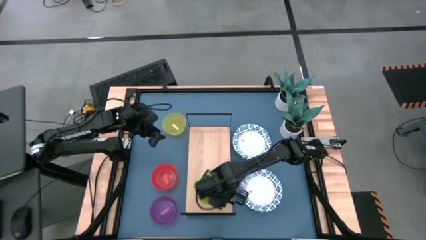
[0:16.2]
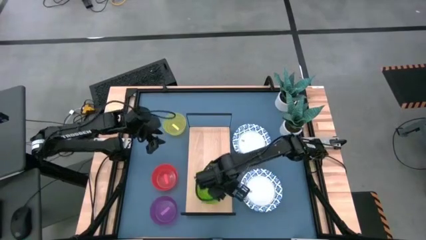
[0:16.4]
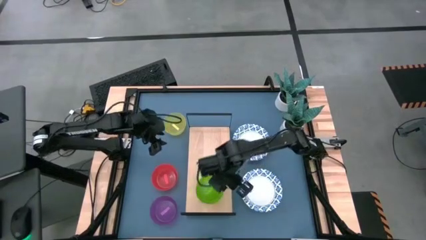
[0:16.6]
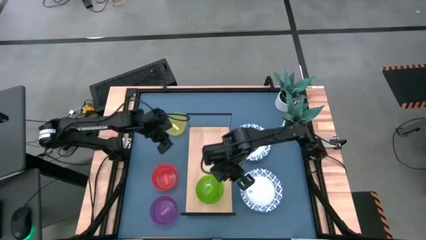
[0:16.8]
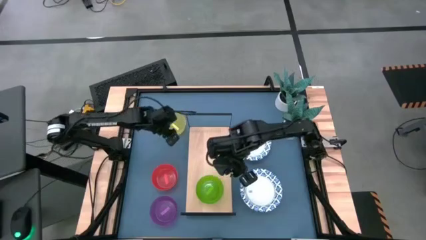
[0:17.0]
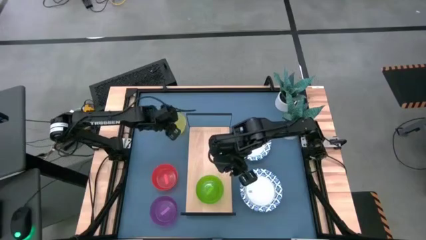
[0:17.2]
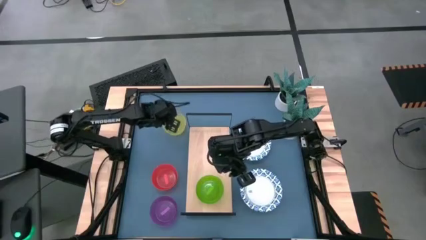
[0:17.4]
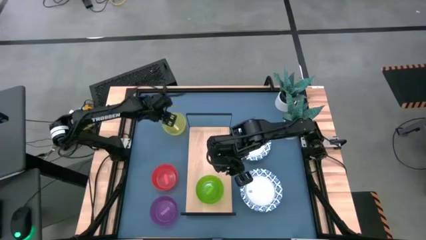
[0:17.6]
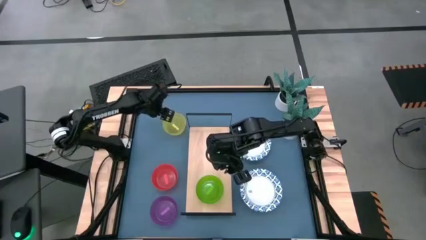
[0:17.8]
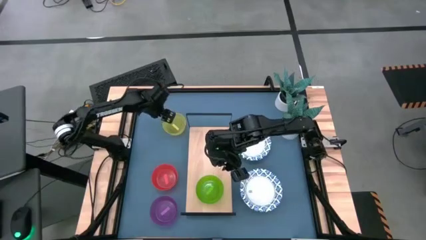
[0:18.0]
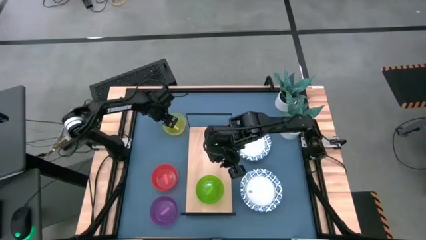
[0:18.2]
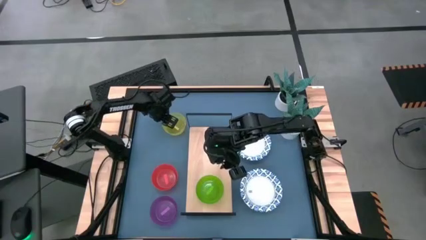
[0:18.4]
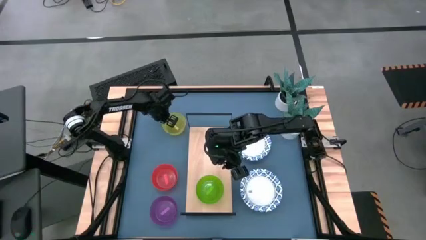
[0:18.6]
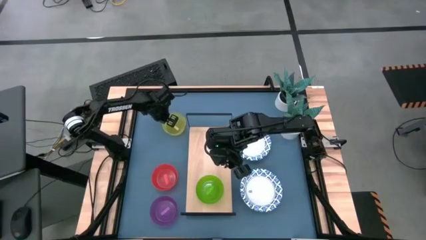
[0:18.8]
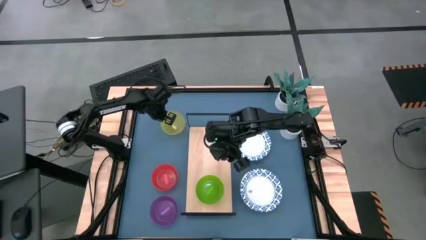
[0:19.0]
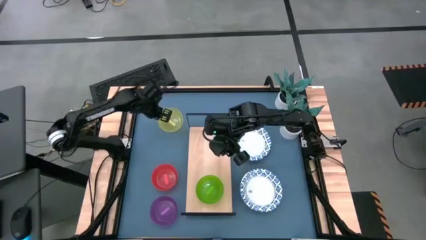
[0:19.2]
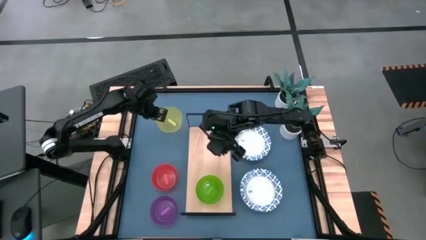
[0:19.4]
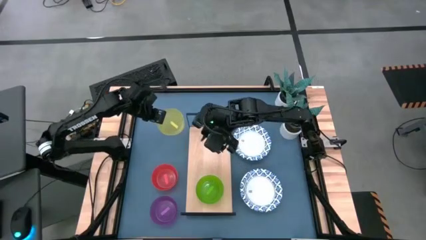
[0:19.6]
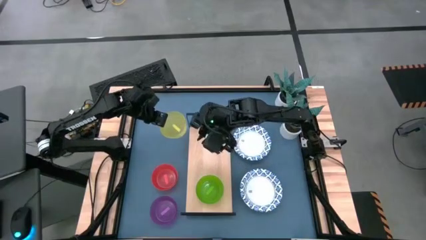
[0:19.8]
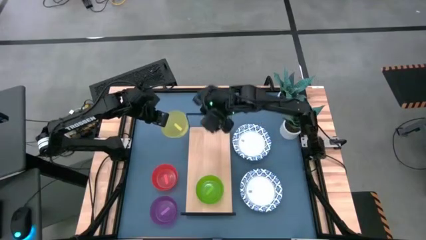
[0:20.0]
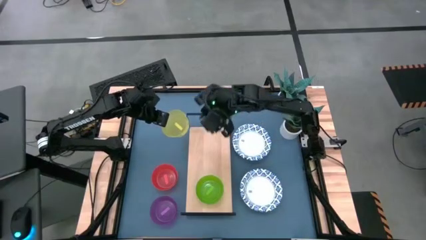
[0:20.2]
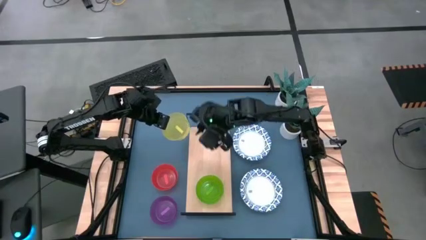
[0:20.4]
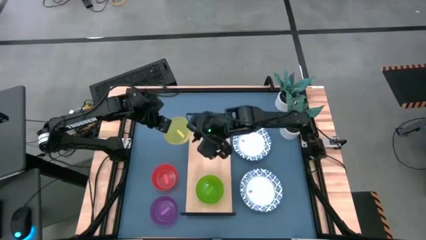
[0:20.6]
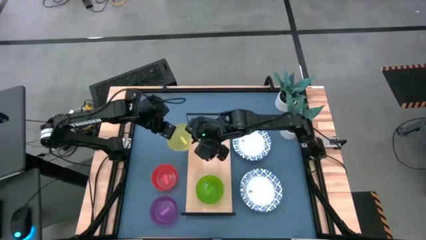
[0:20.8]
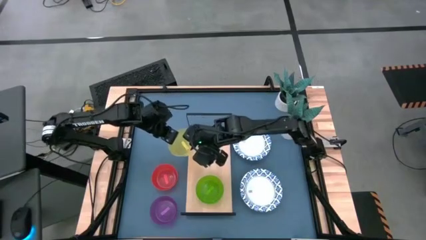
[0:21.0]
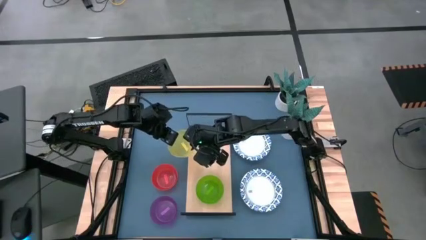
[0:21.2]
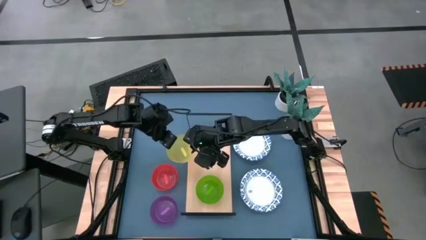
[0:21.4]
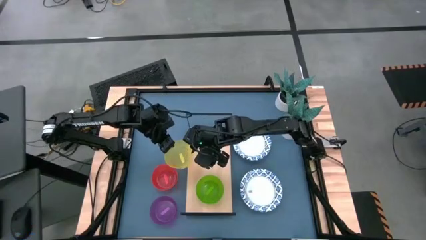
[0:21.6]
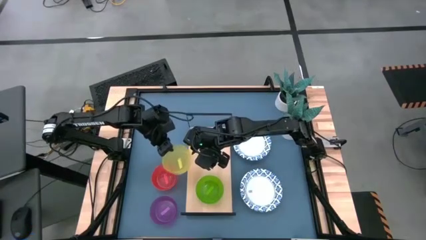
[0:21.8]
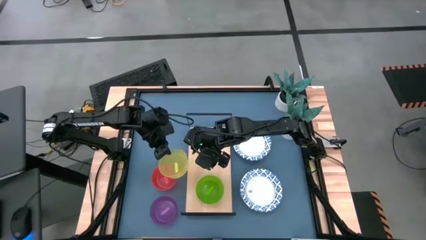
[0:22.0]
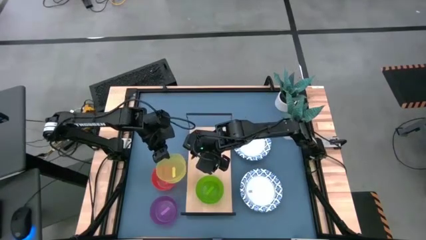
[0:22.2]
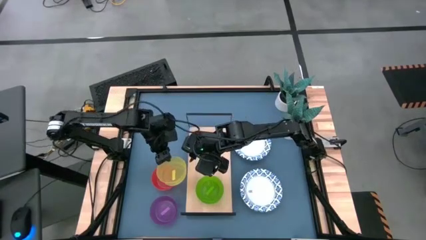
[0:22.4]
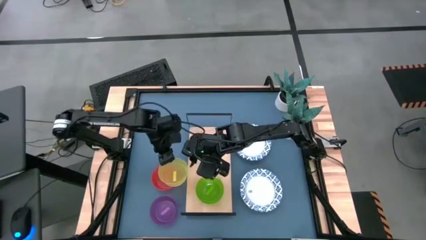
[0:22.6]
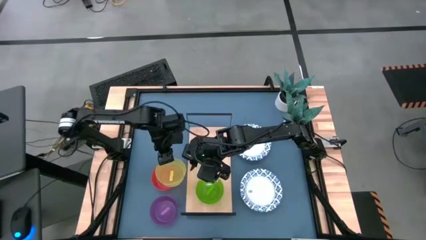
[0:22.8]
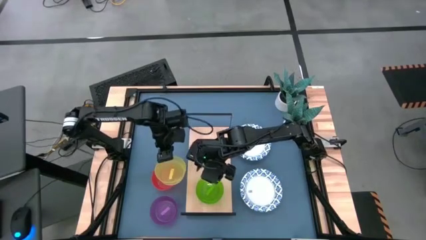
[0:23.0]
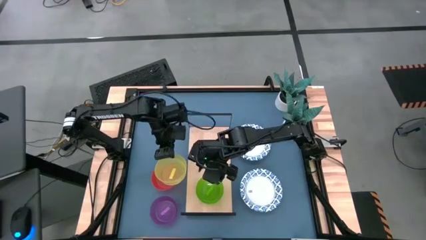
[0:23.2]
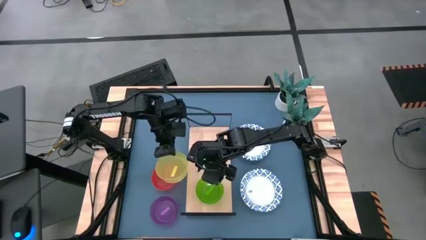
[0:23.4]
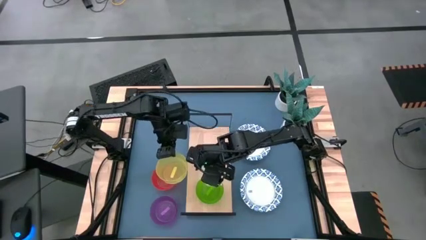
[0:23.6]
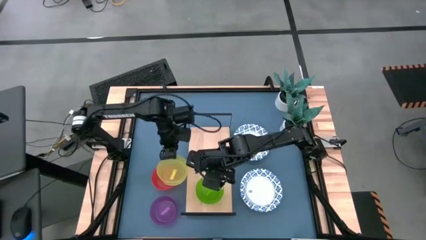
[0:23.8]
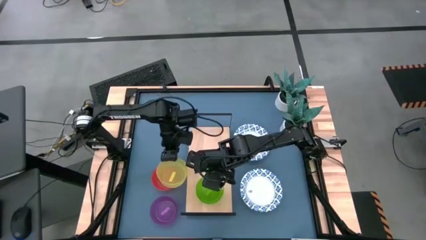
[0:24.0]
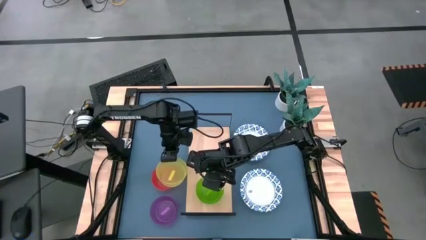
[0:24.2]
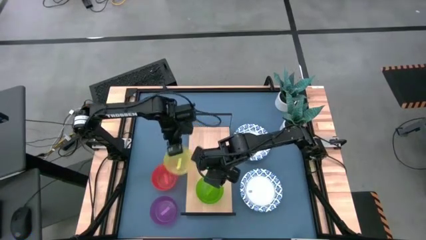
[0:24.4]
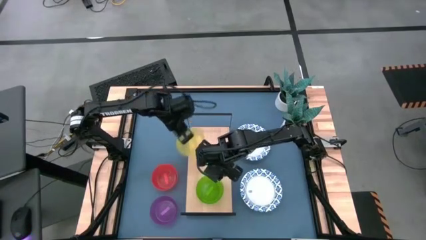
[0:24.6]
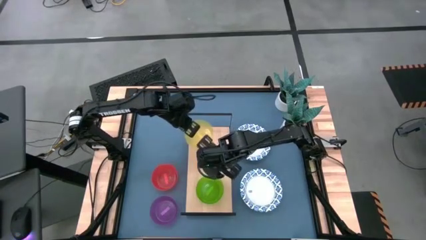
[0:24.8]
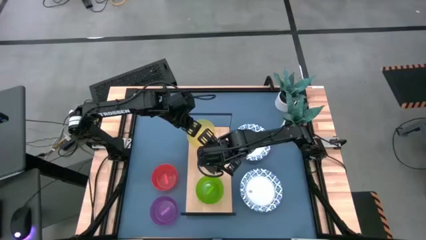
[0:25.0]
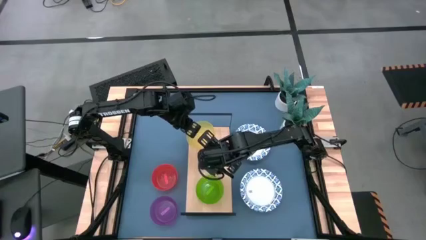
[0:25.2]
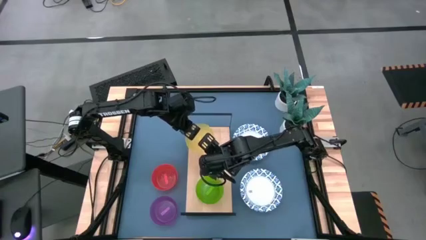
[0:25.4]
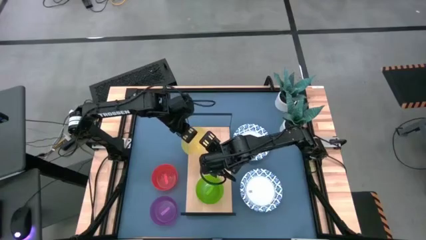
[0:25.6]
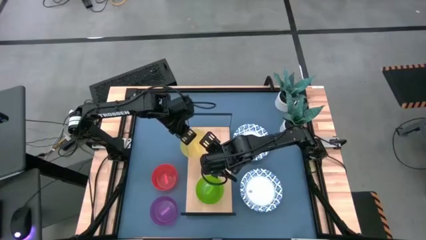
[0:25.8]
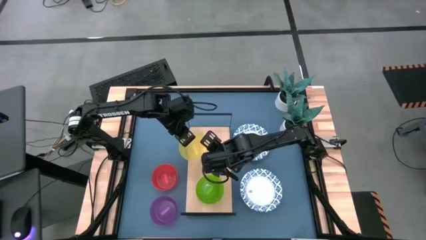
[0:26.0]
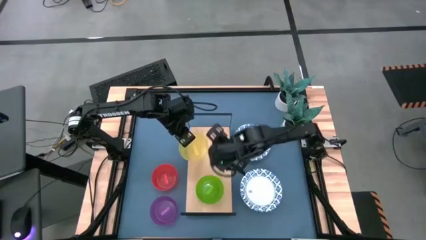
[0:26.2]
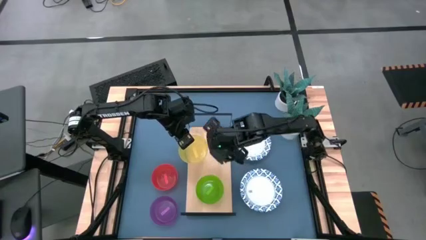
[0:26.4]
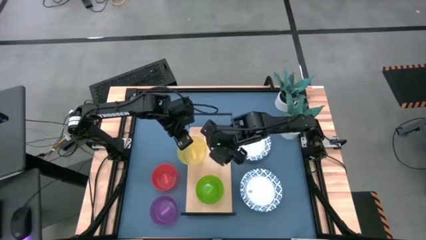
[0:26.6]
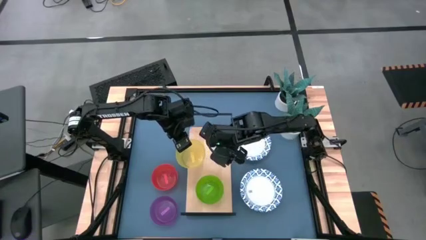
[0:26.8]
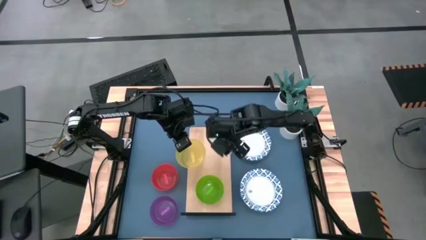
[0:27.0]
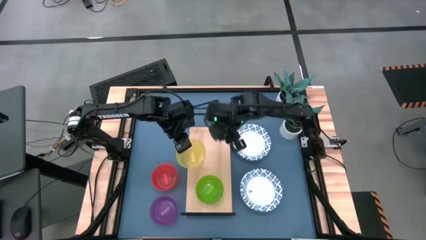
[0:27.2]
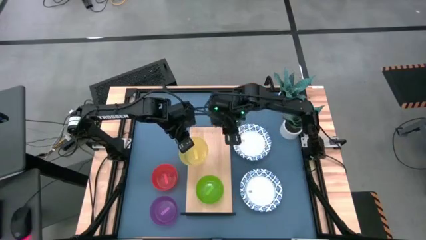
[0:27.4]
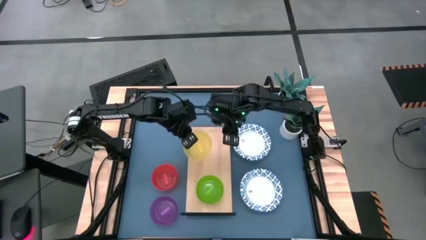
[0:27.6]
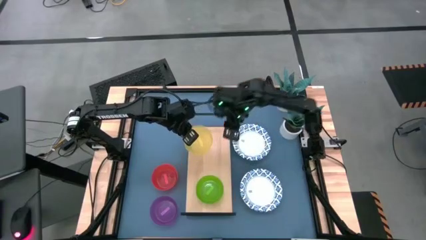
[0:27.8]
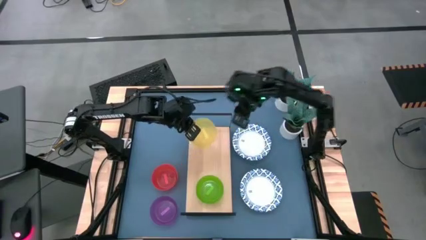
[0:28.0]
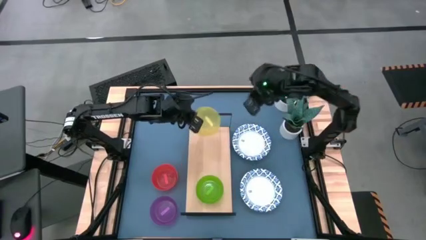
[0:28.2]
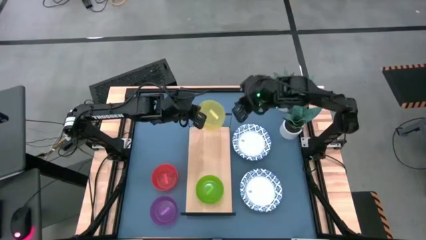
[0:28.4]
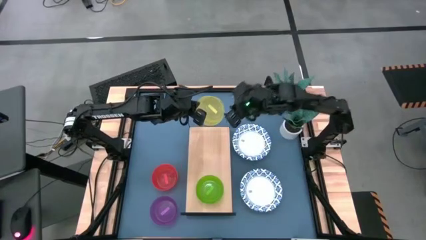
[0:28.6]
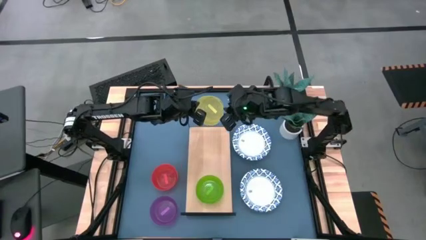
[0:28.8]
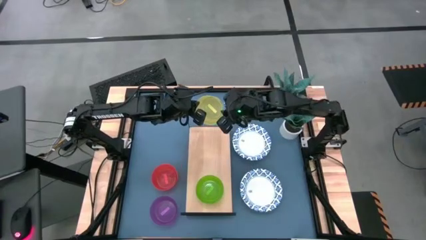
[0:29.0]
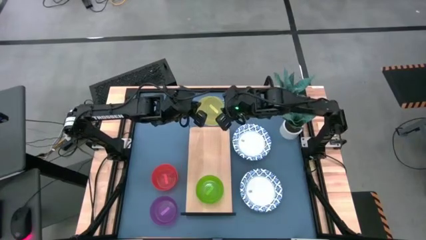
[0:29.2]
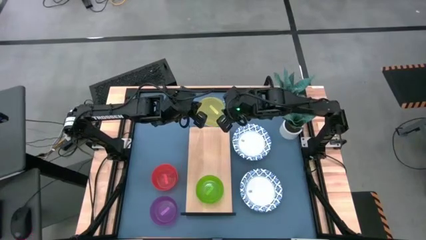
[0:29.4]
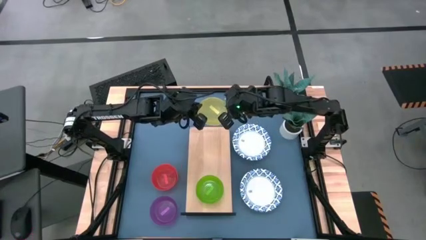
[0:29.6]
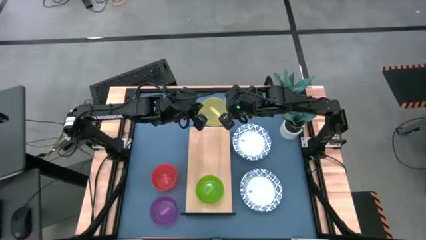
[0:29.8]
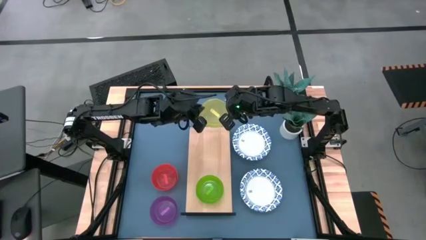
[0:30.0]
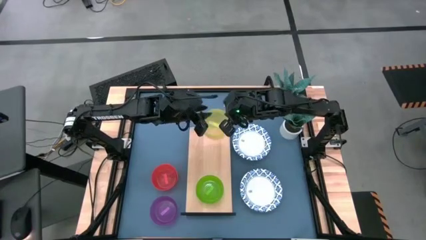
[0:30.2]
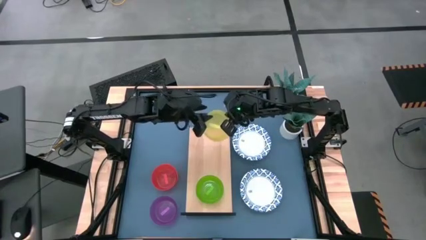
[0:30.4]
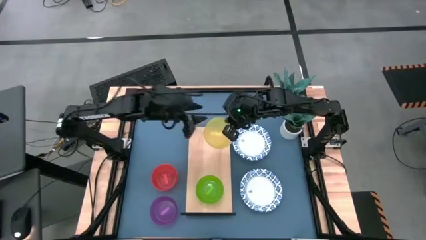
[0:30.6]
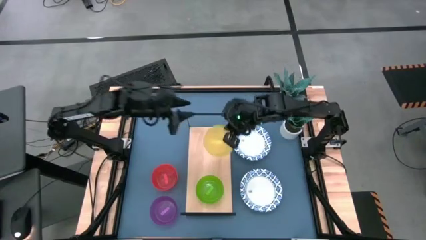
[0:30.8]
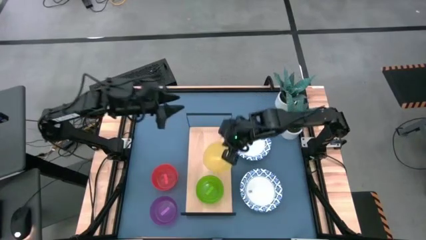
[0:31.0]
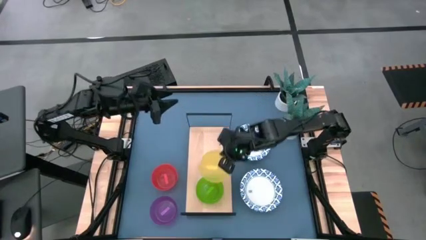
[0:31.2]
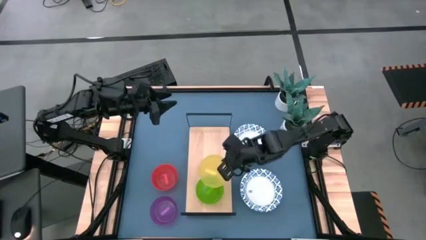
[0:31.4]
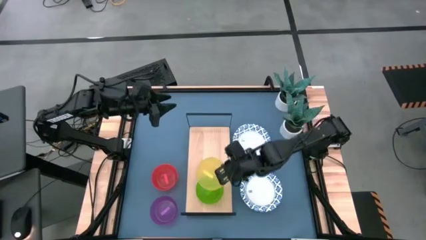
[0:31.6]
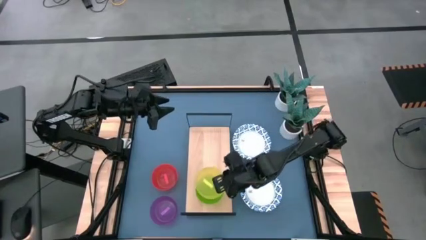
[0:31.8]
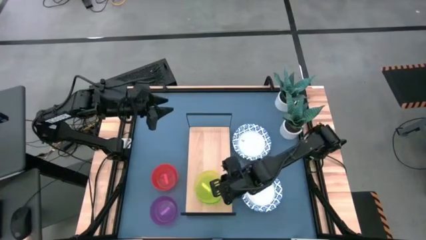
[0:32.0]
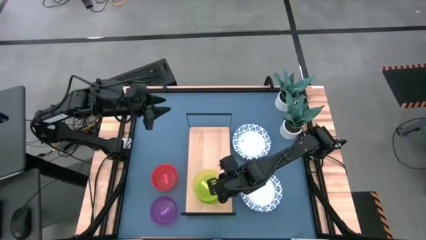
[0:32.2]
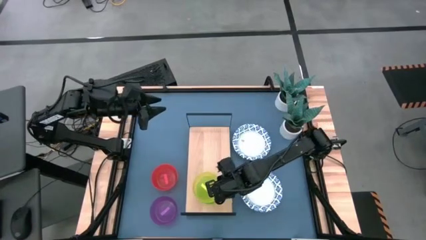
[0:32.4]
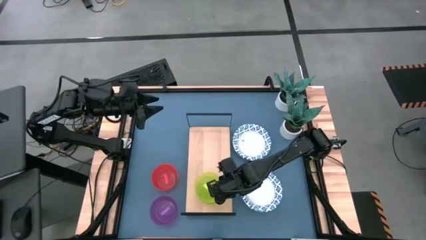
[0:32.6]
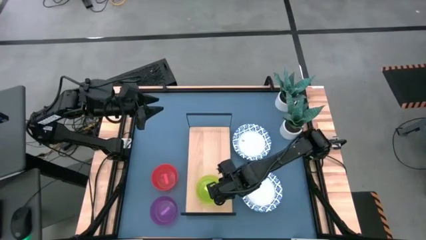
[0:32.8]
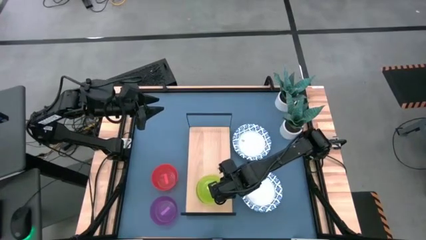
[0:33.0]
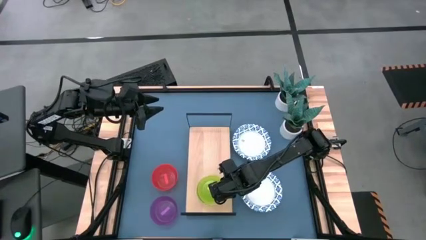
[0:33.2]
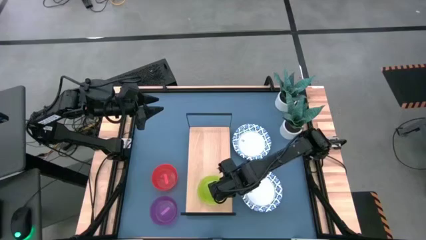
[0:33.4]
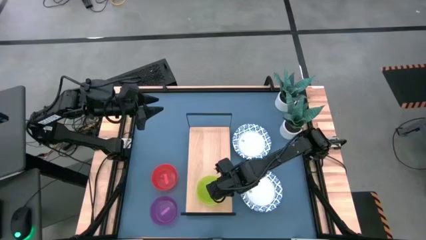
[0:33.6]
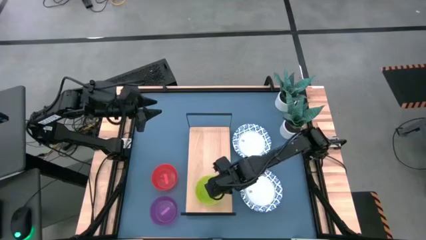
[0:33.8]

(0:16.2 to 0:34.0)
Task: Place and stack bowls onto a shelf
Stack the yellow bowl on top of the green bowl on the shelf
